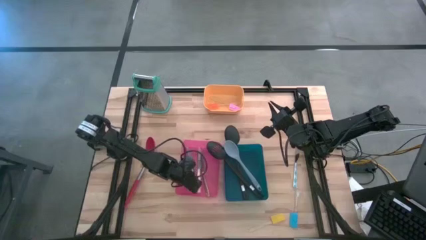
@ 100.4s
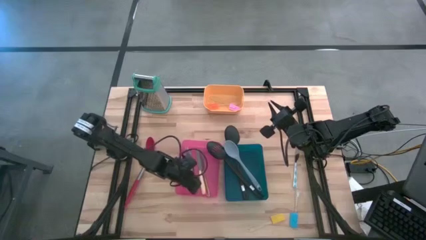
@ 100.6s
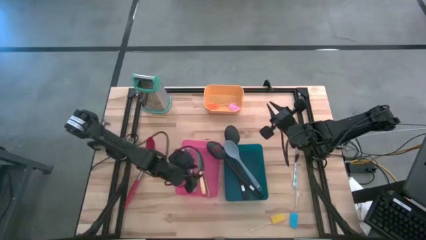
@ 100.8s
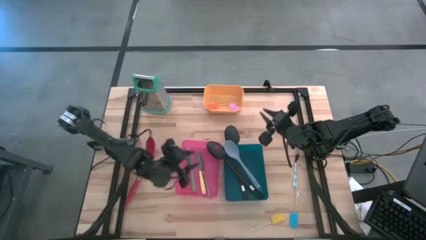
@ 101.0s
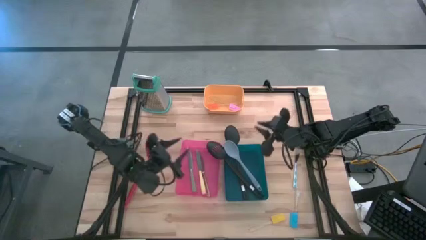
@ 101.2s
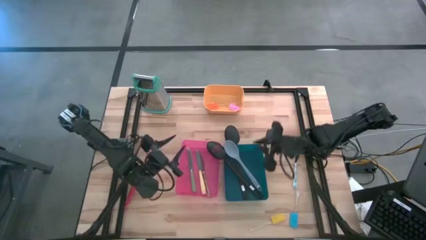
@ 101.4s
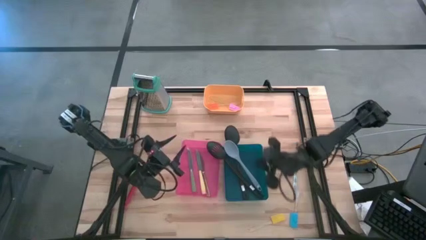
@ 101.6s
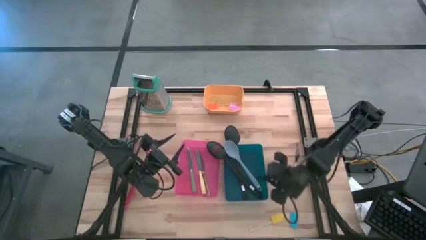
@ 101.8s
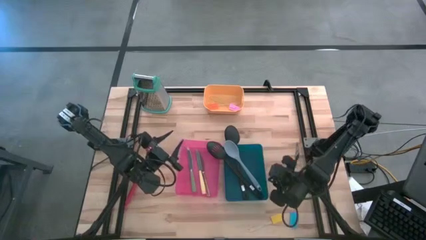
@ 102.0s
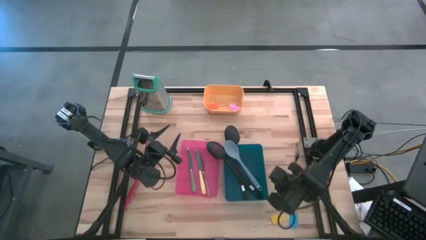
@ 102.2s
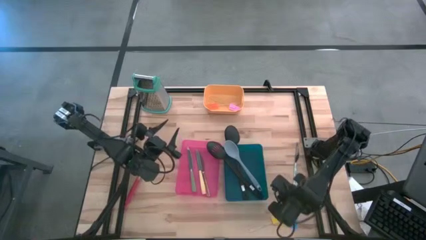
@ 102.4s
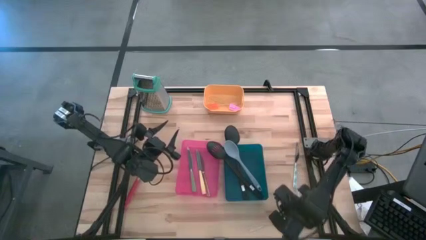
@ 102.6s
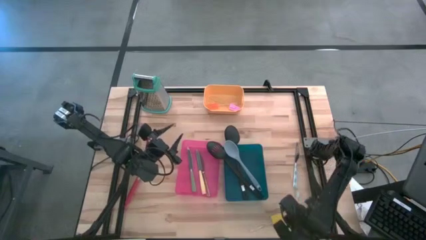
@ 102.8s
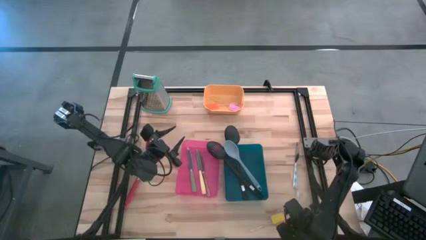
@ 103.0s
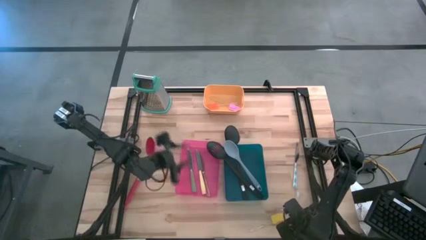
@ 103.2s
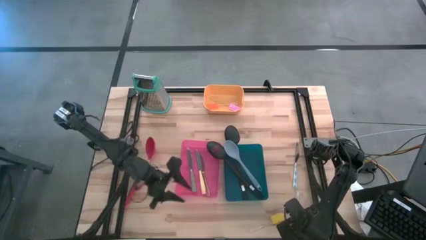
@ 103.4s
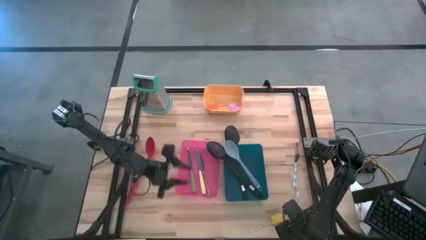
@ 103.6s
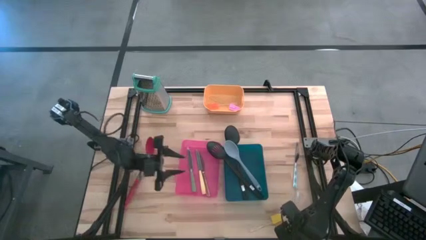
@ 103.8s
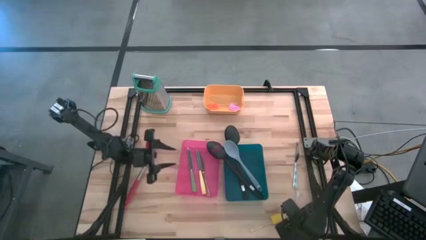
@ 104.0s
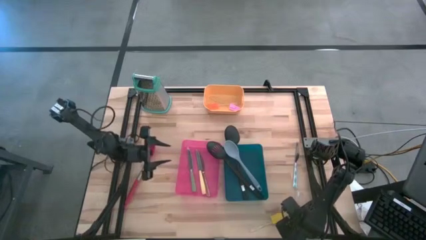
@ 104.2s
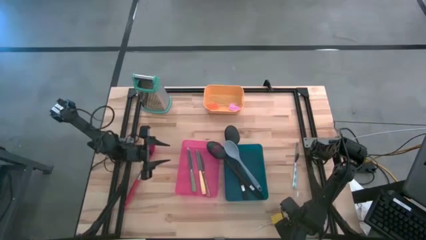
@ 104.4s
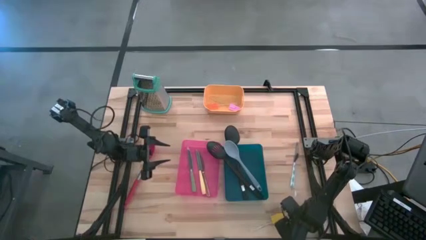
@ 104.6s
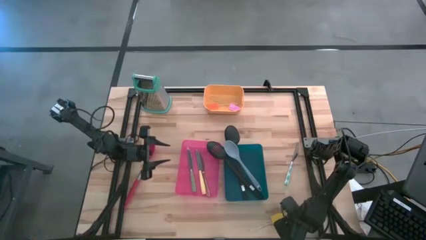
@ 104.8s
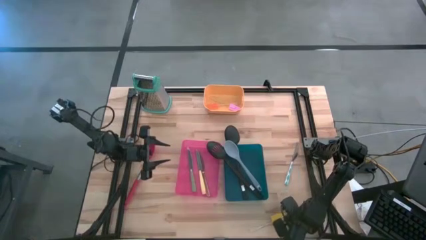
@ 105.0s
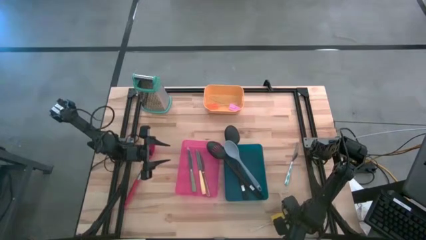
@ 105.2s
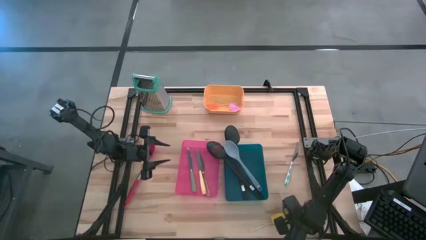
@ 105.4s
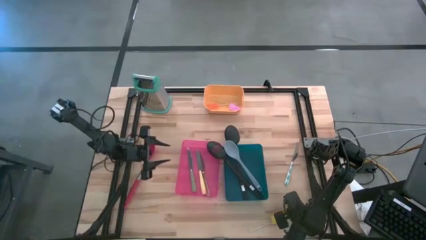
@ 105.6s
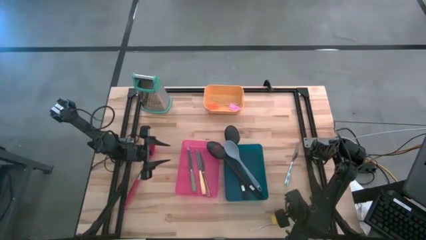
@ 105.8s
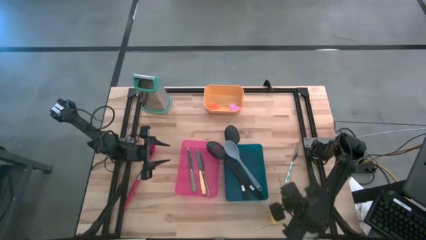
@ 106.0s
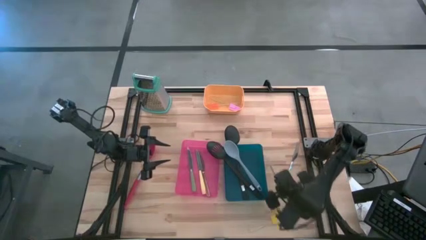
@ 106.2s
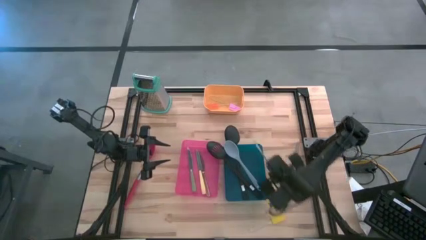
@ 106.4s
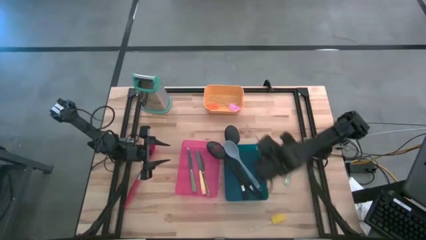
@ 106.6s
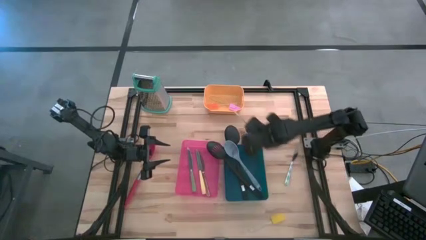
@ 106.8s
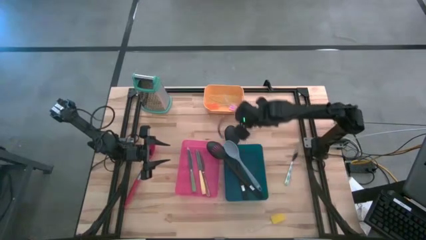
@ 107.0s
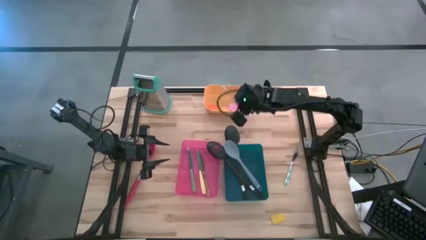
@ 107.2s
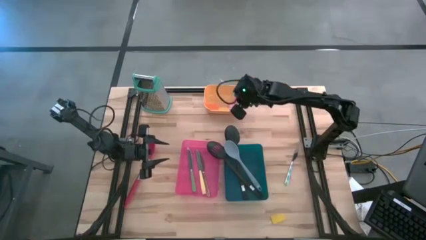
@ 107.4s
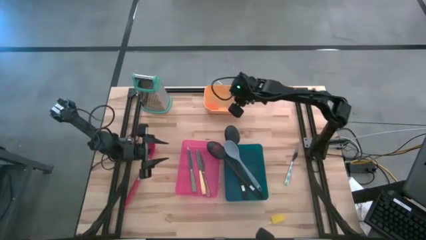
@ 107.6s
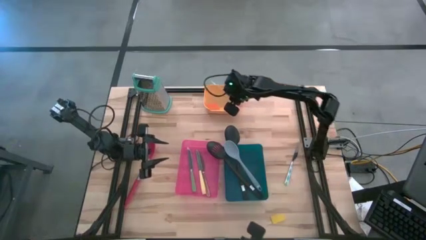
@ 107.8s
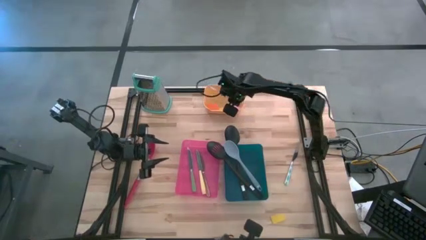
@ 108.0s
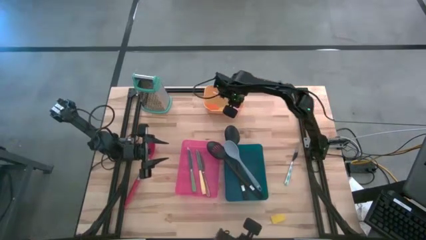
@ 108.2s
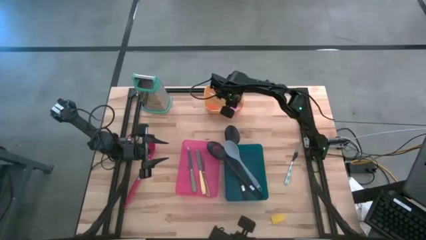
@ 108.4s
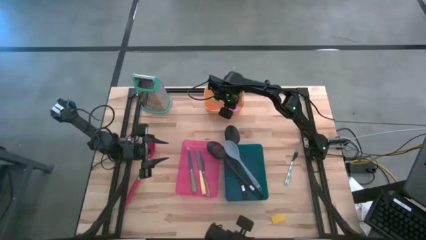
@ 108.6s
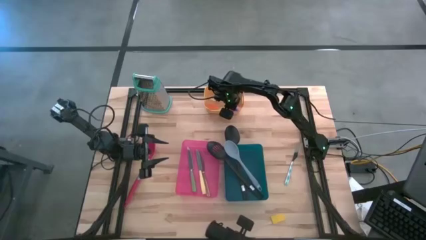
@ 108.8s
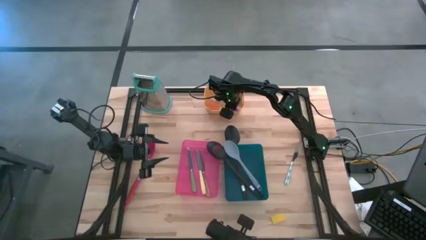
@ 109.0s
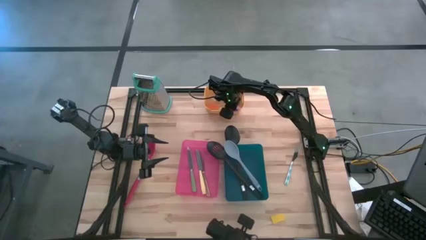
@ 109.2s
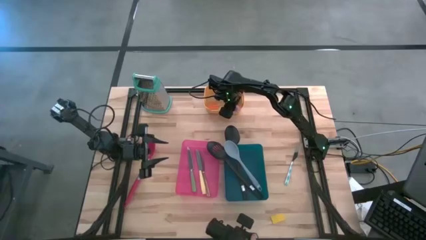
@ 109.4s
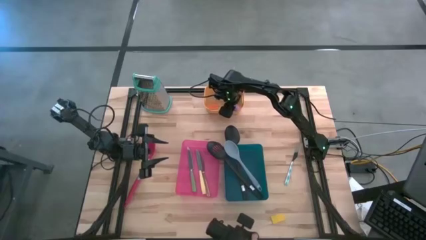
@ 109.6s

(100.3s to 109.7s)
Task: Pick & Place Kitchen Items
Put the blue spatula into the yellow bin

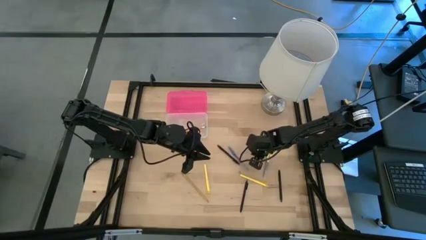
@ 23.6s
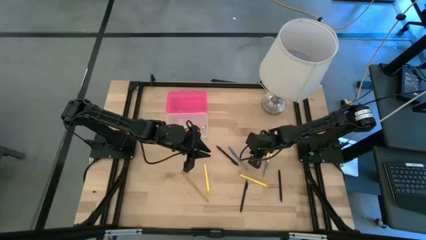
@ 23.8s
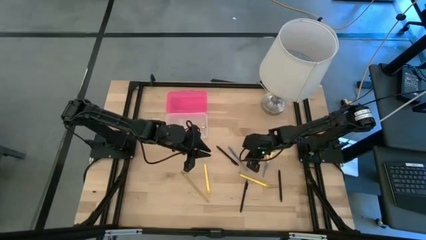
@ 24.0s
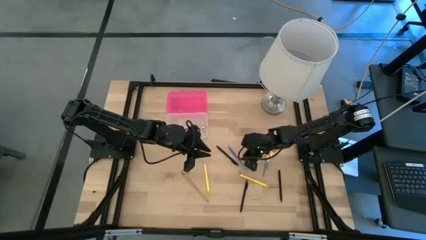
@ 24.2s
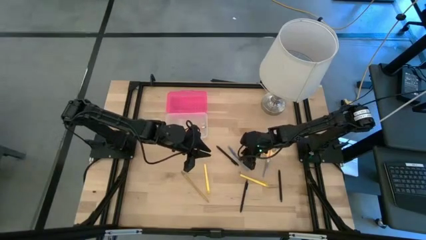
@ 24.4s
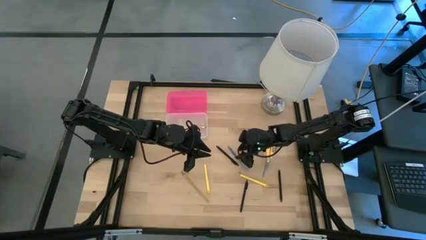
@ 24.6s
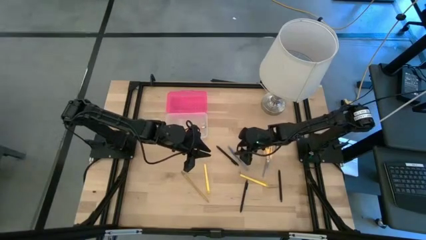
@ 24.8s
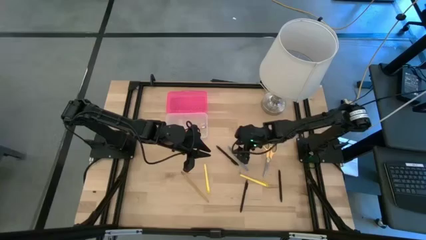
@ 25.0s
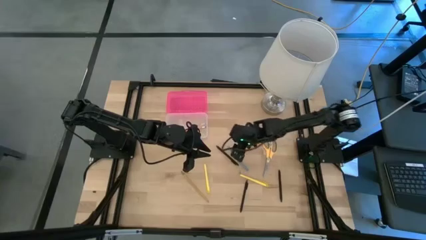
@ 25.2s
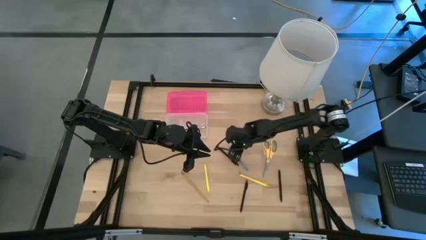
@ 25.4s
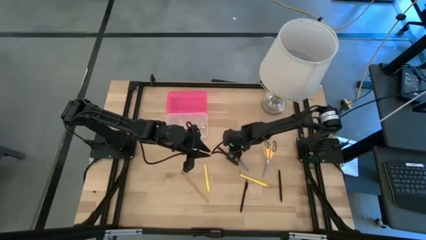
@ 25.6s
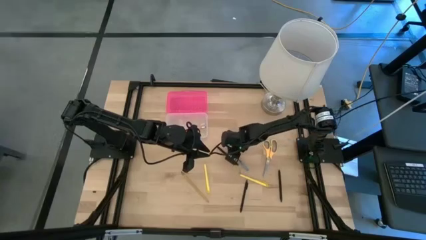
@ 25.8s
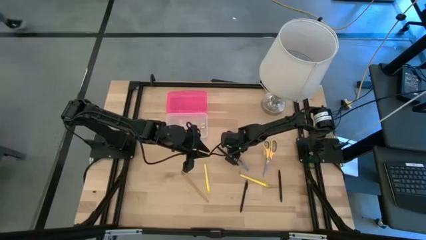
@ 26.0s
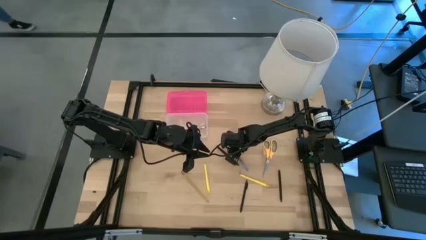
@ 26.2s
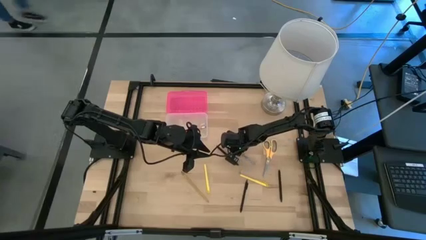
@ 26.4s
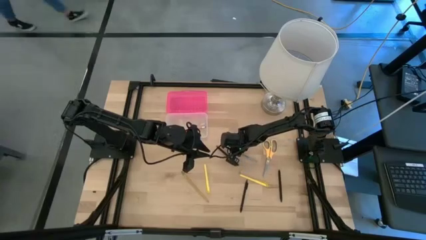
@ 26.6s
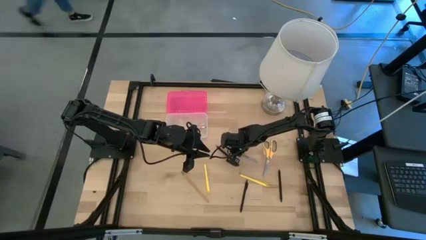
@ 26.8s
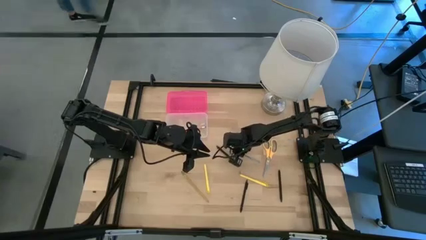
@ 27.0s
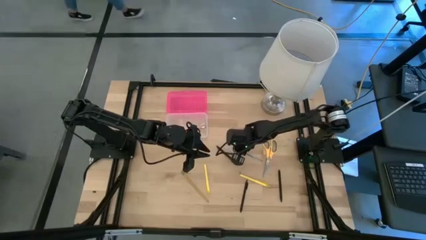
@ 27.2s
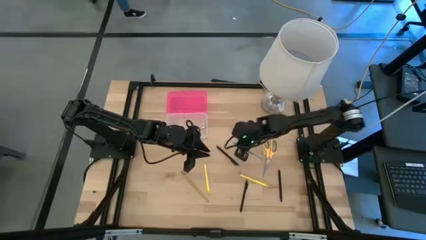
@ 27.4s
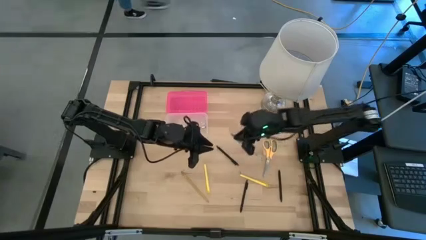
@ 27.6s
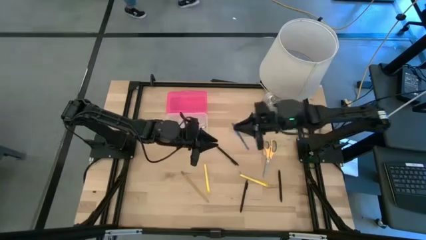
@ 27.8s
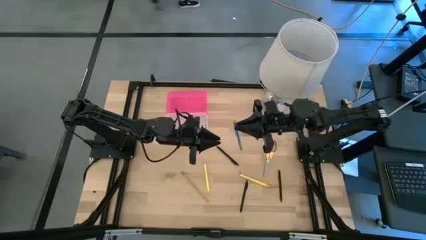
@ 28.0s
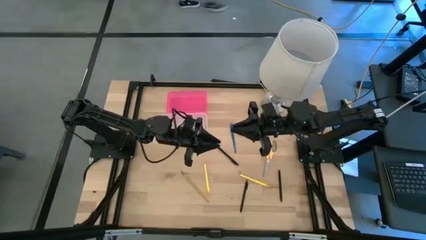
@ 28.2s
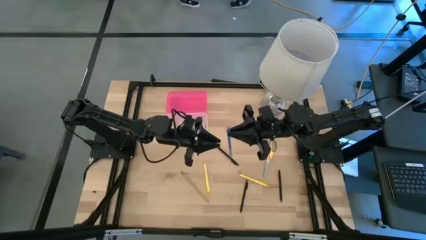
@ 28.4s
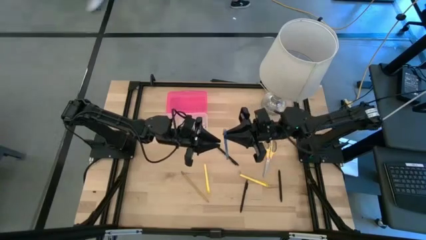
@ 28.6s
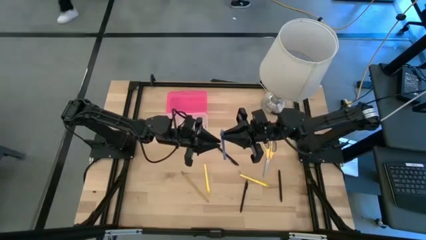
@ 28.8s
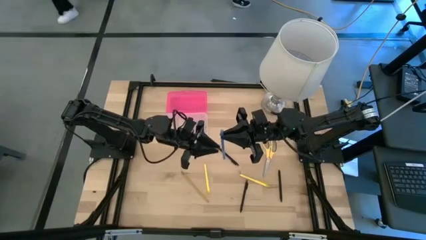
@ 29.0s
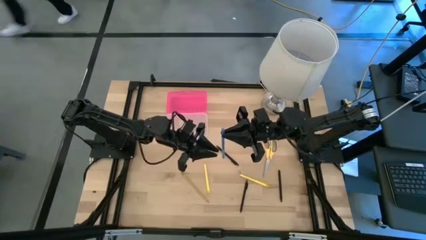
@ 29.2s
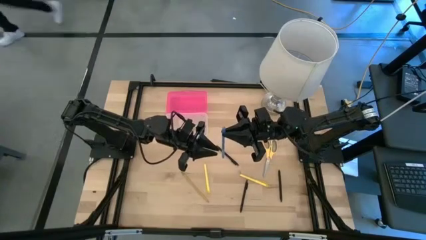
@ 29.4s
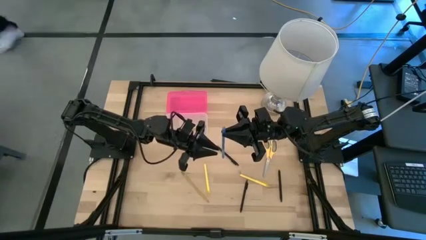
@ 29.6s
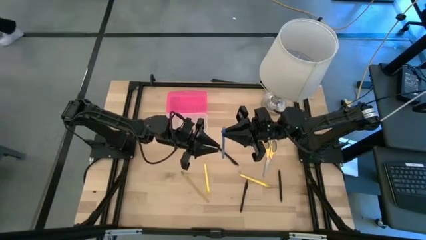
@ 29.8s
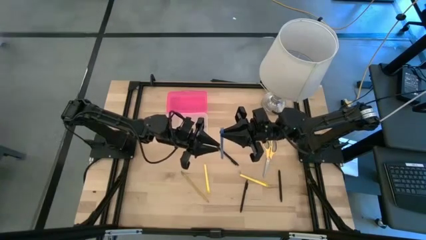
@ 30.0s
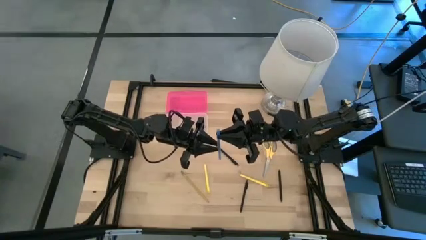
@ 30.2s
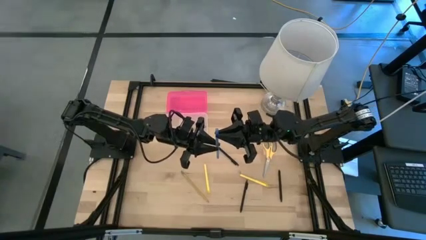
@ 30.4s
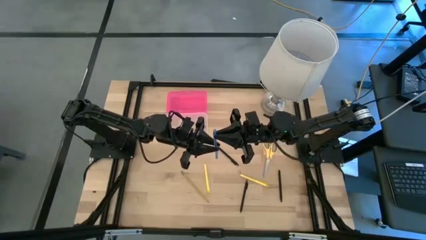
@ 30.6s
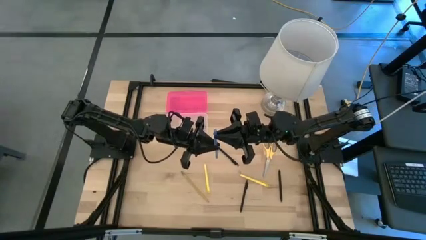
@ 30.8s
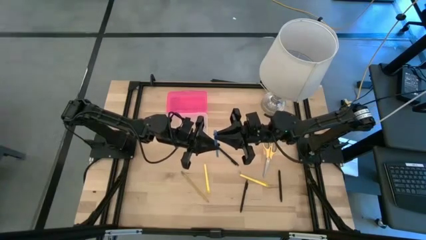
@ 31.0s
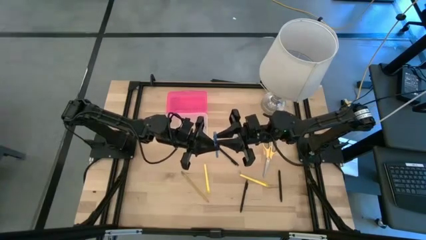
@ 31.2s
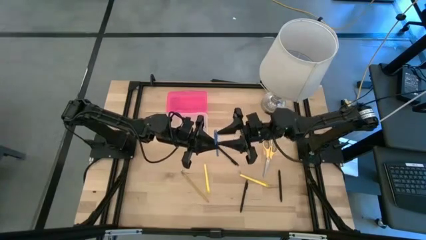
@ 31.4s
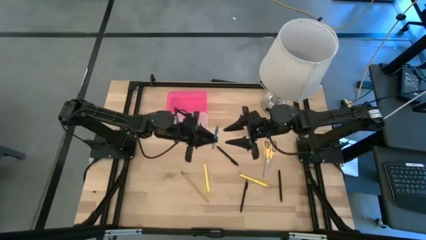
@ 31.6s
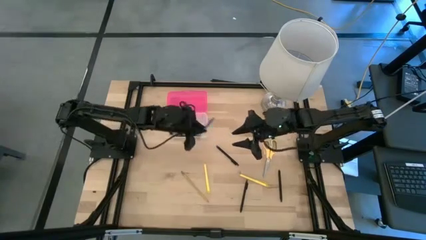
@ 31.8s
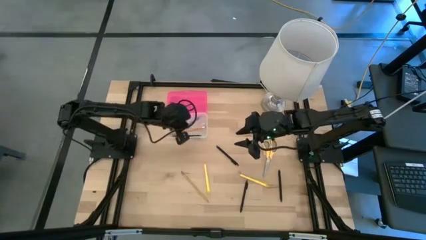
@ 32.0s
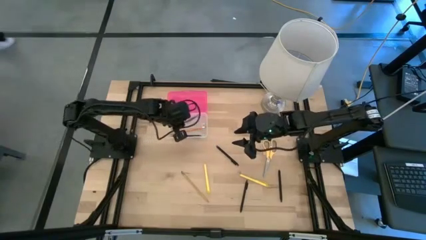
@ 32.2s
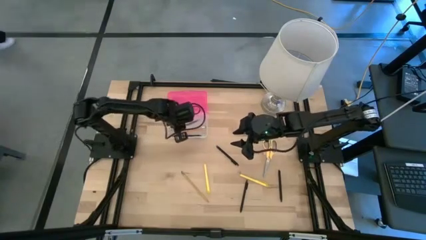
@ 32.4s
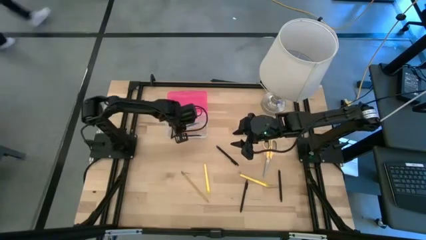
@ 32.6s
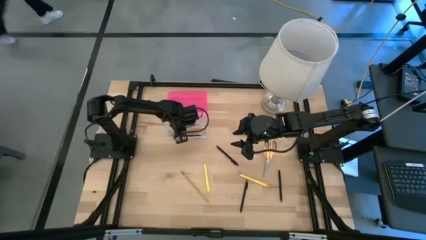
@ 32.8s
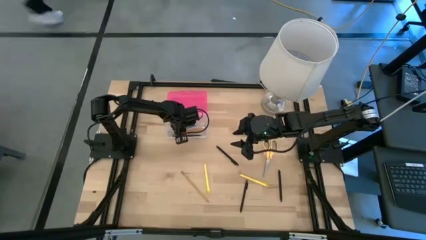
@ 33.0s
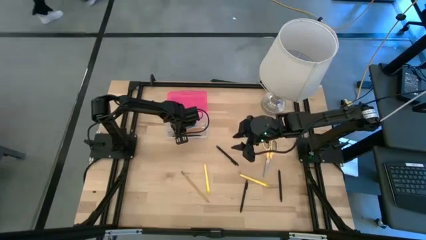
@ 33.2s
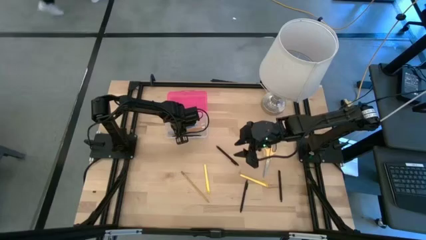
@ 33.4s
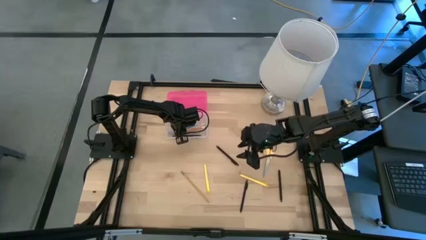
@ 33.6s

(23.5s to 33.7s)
Task: Pick & place school supplies into a supply box
Put the blue pen into the pink supply box
